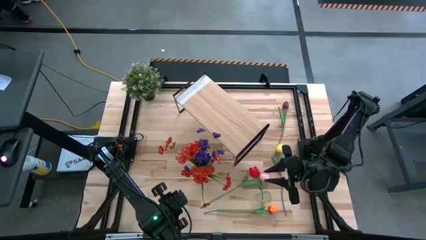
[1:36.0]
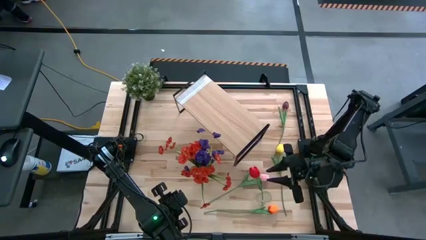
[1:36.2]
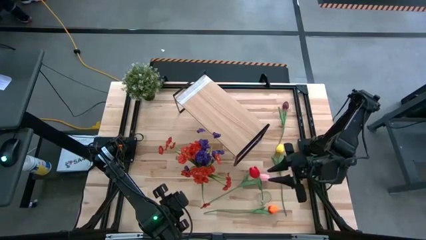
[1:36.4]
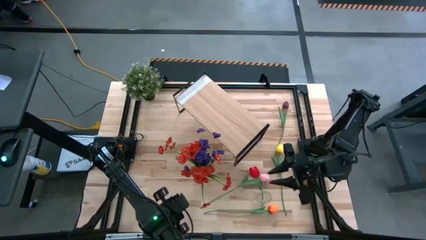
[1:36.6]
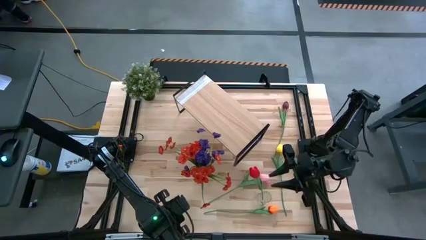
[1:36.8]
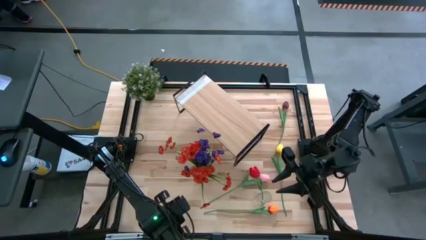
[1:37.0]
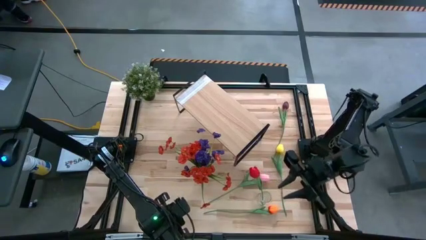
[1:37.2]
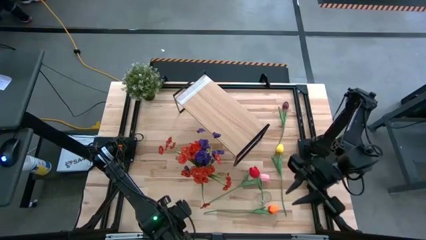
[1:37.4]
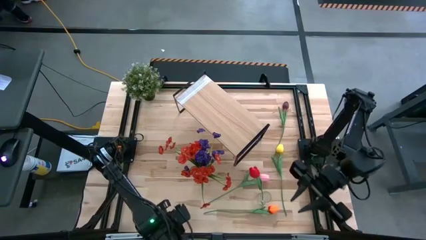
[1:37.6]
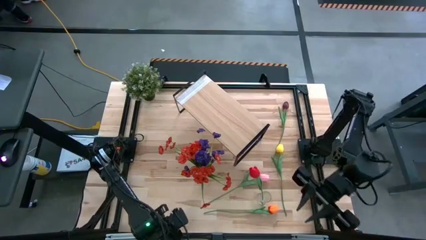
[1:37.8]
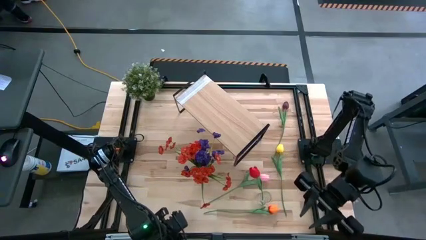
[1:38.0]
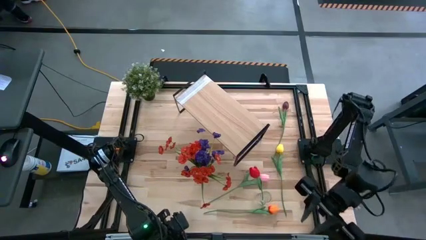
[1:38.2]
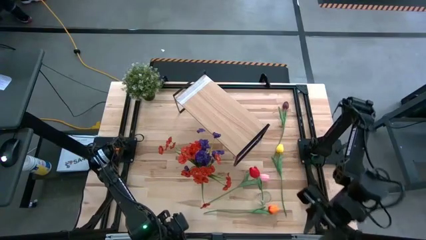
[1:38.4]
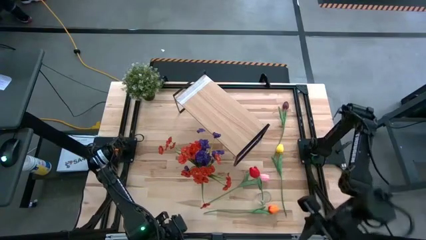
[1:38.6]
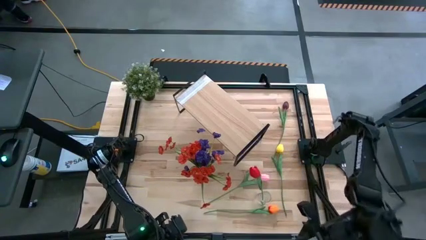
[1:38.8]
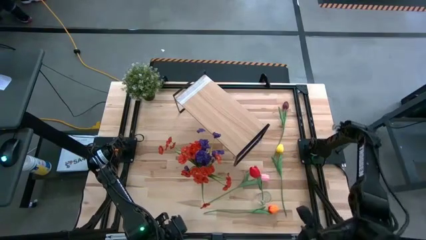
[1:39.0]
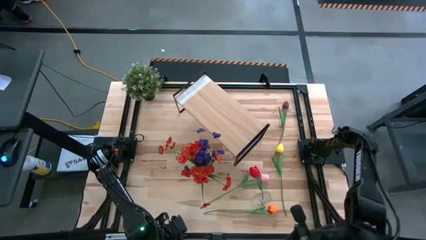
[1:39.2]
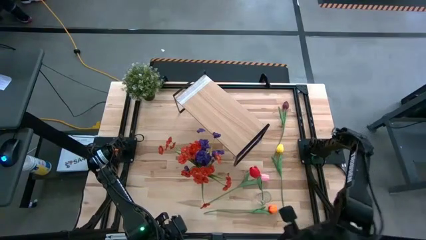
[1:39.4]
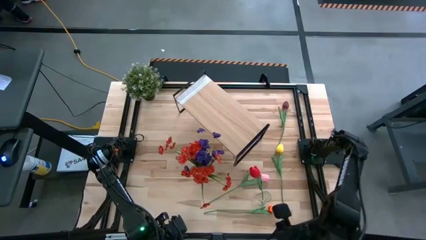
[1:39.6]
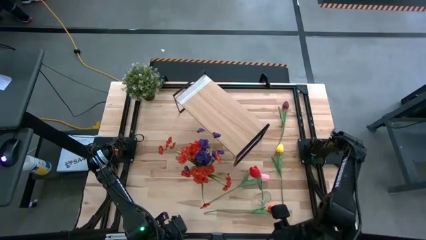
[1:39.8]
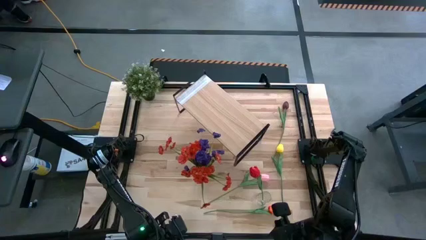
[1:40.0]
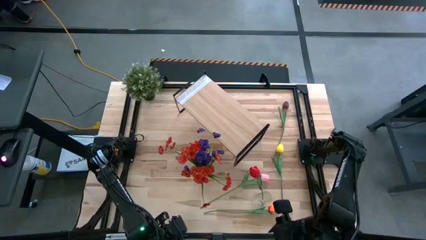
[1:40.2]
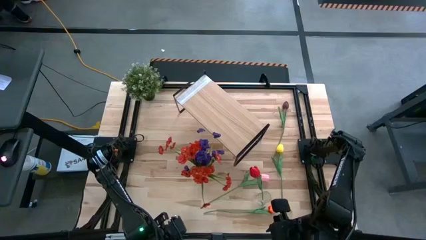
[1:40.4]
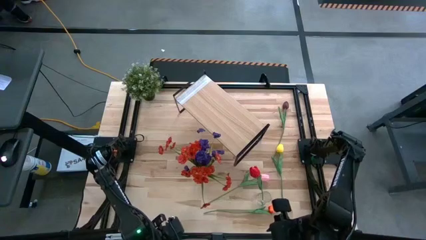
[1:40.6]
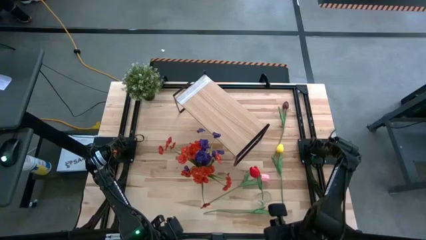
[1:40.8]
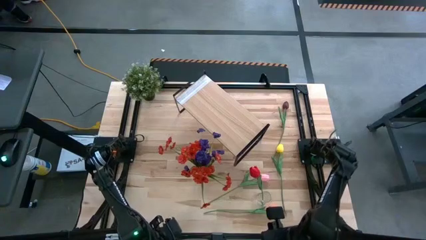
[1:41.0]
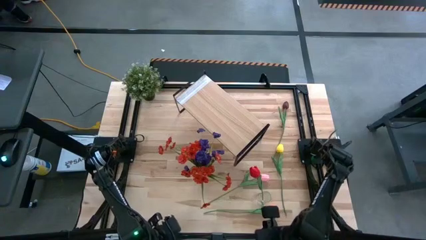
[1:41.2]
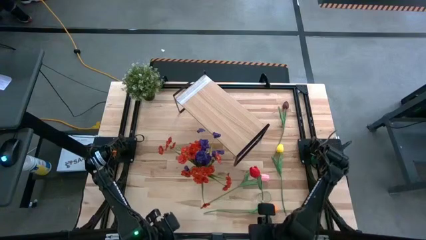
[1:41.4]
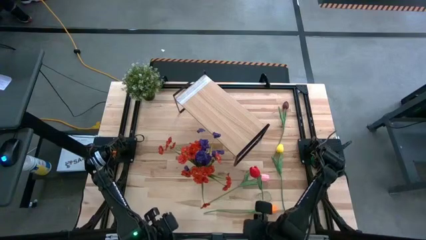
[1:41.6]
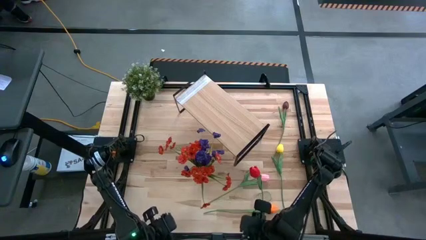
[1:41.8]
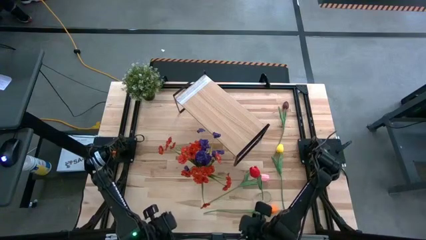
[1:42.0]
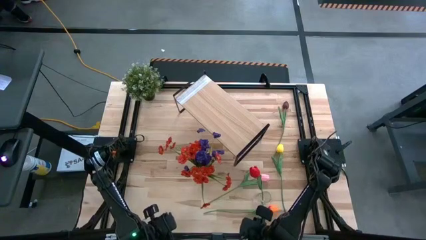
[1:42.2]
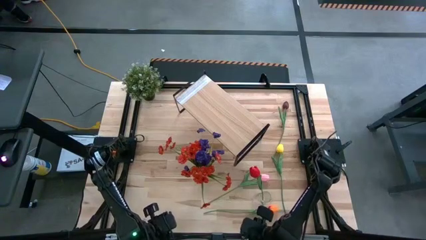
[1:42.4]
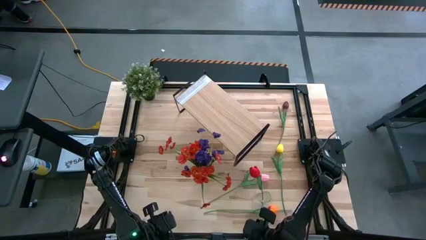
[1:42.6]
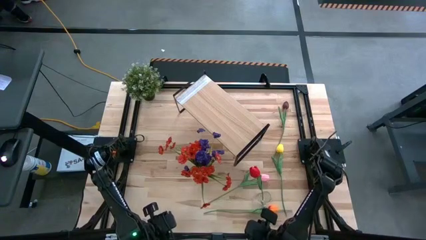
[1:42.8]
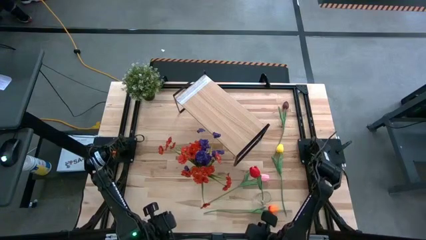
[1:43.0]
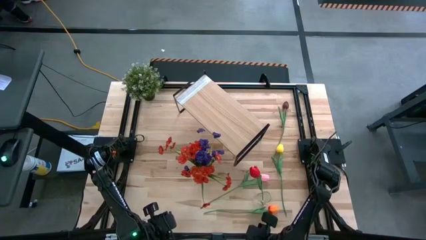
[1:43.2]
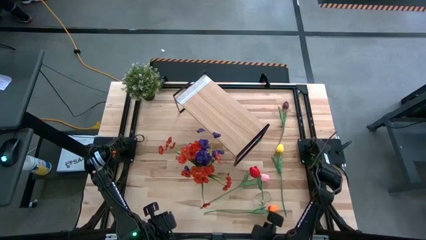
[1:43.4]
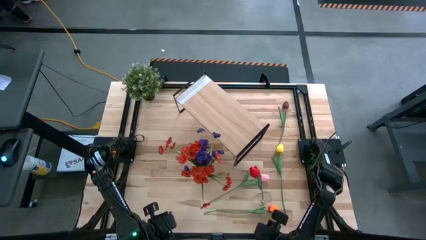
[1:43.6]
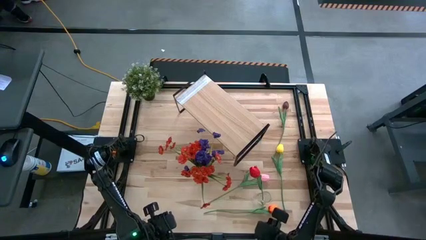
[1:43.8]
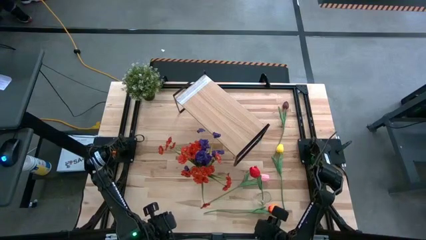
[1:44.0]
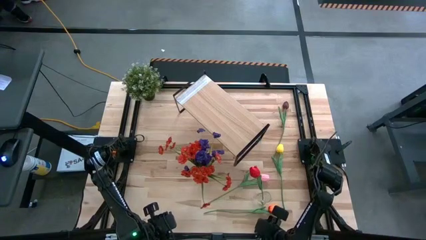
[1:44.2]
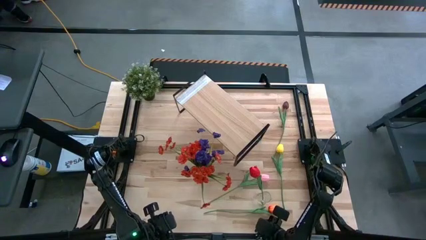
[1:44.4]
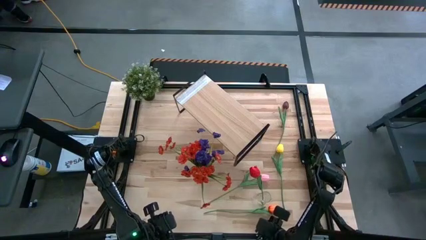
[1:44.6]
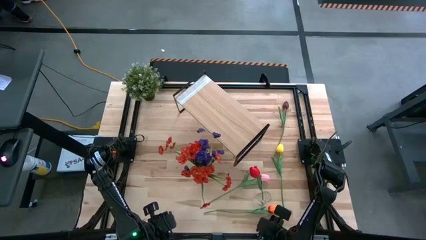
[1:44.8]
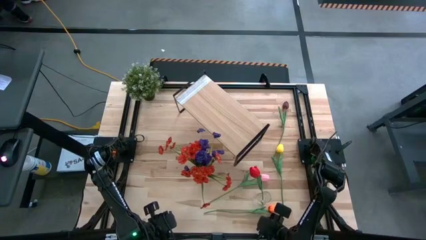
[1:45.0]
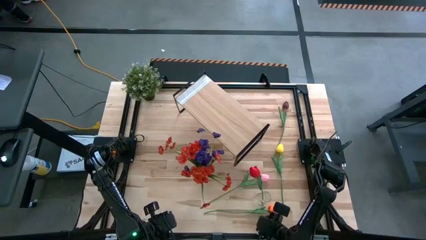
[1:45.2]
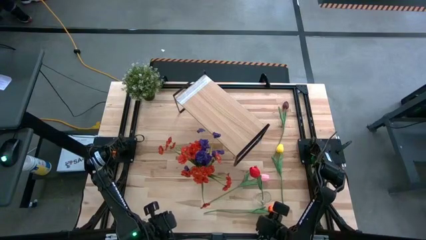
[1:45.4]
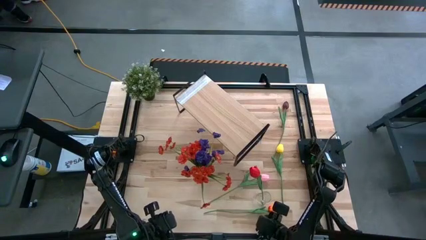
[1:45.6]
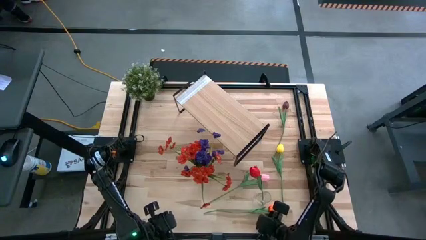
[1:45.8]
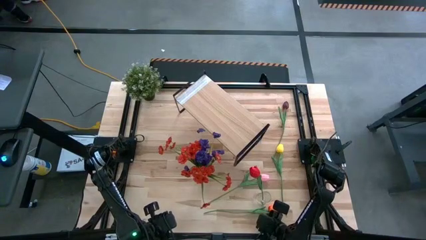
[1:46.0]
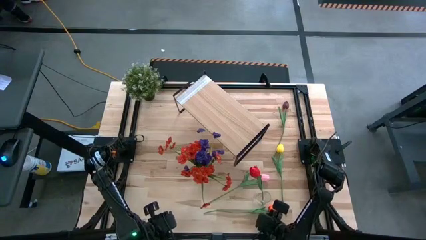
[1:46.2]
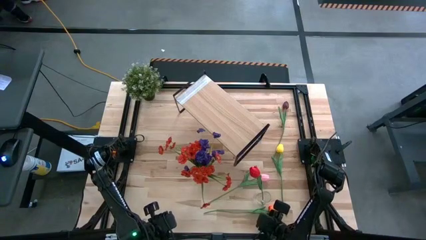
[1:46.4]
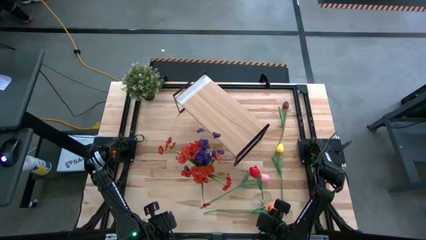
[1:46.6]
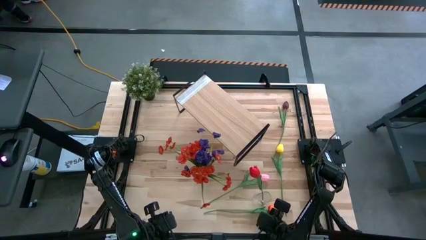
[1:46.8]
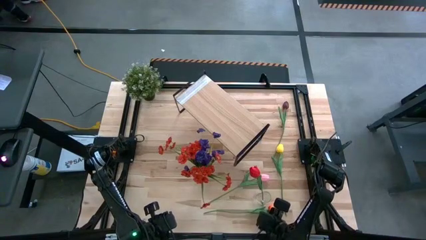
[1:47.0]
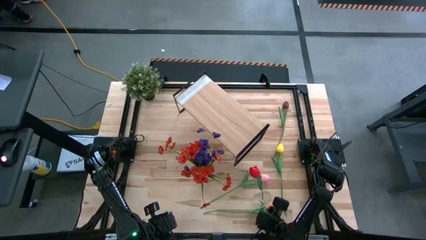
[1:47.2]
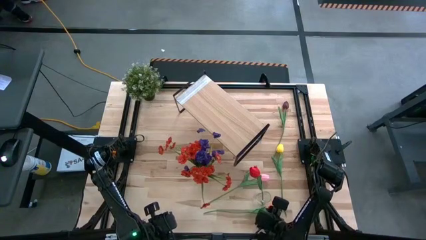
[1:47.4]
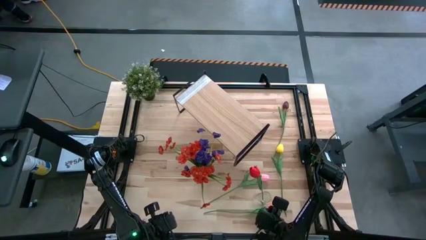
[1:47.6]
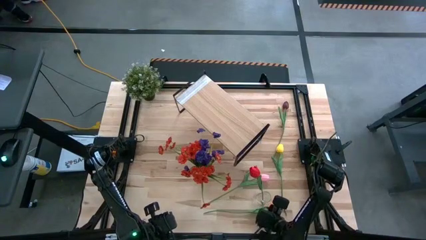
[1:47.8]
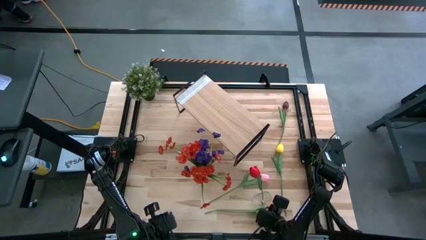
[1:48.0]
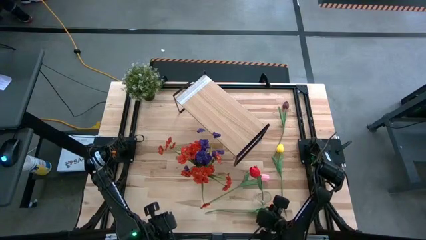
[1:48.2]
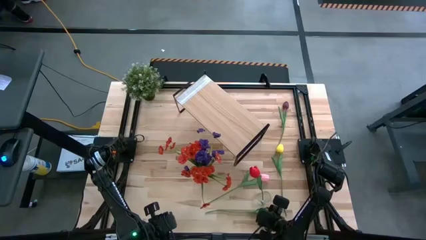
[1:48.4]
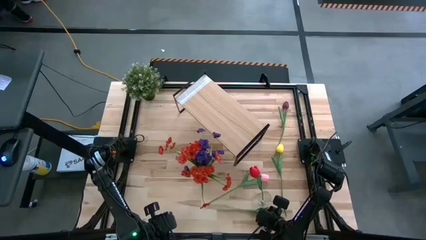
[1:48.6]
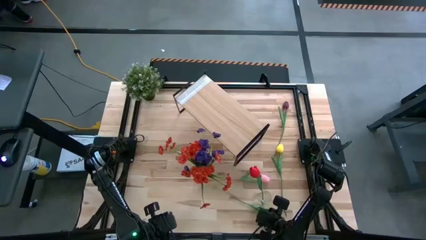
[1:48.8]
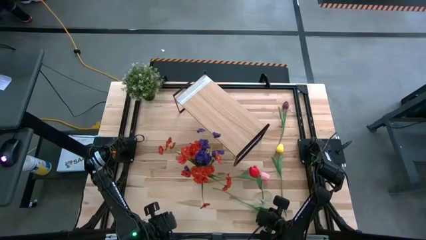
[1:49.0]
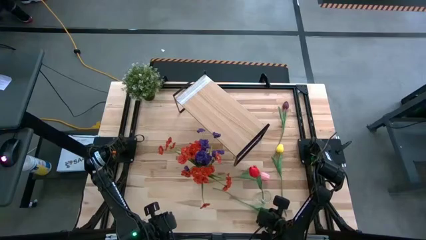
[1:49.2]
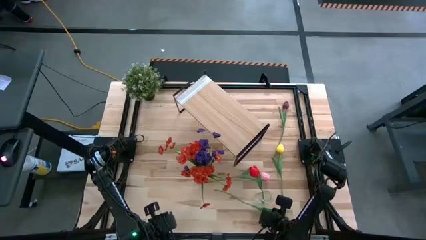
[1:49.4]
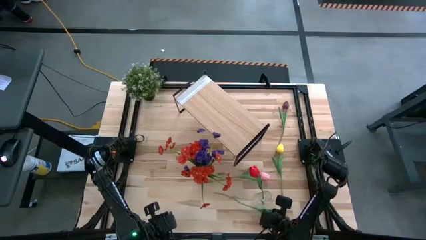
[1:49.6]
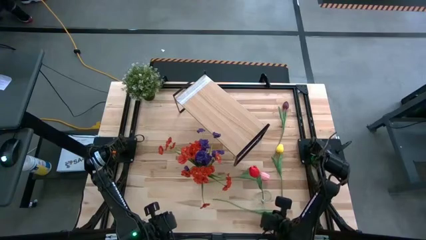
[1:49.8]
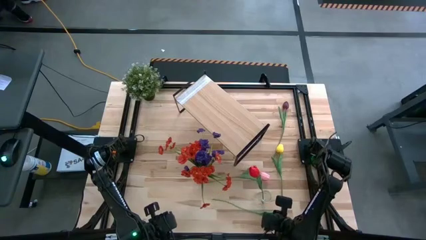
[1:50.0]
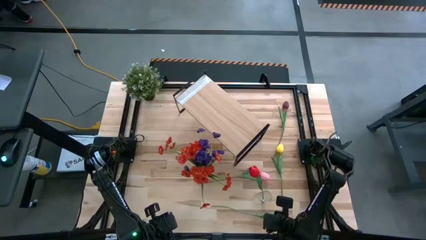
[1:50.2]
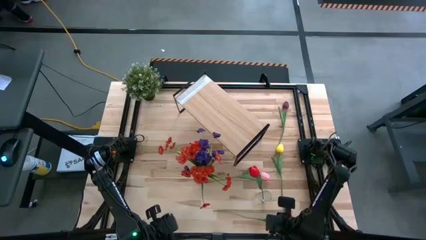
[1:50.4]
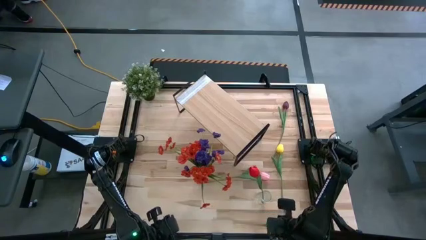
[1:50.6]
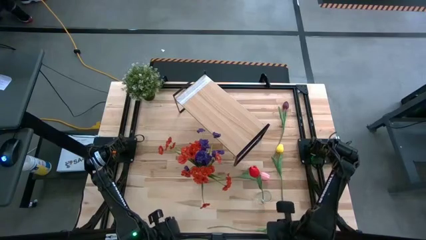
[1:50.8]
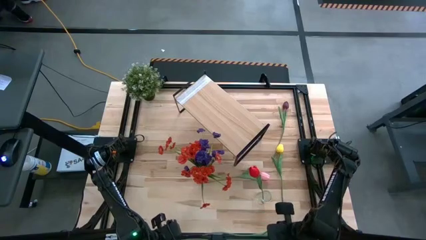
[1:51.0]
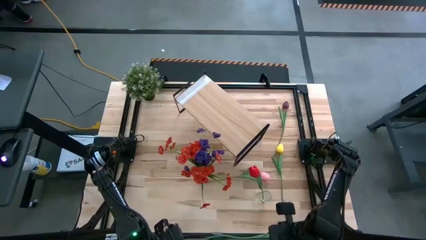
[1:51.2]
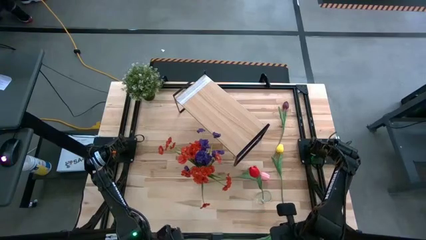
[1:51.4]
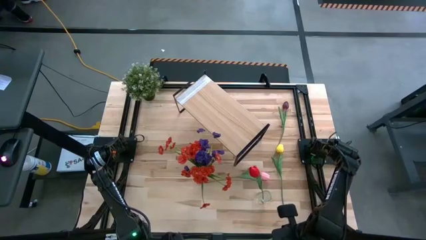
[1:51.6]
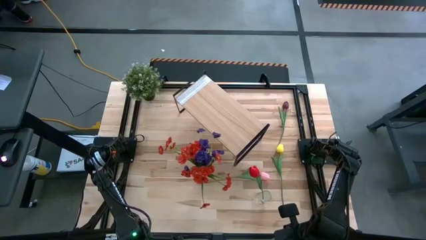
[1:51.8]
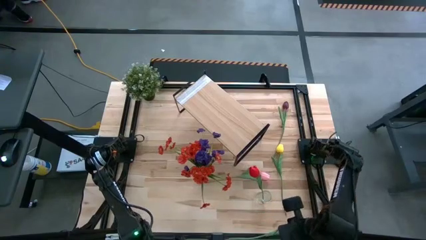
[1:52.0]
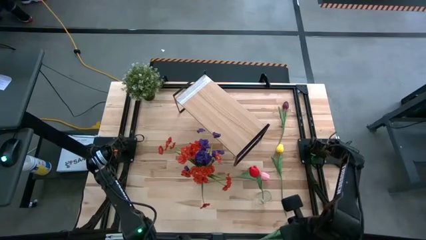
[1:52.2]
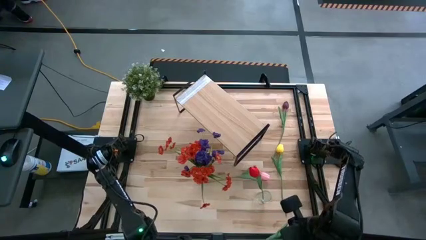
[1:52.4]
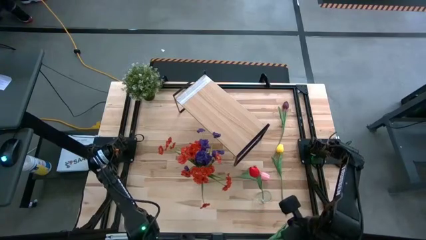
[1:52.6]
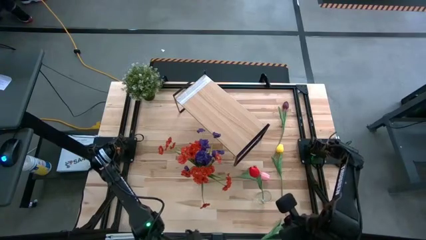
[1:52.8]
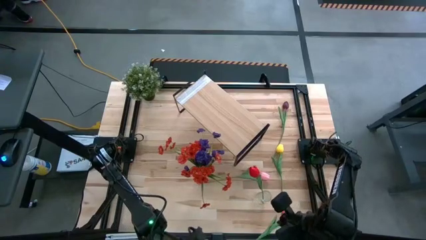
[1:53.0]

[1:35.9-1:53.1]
Task: Pick and place flowers into a vace then onto a shelf
Put the orange tulip into the right transparent vase
